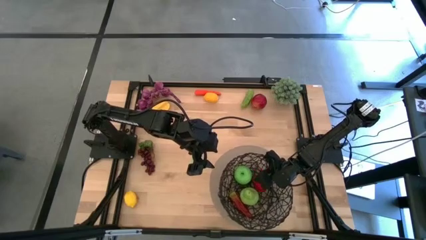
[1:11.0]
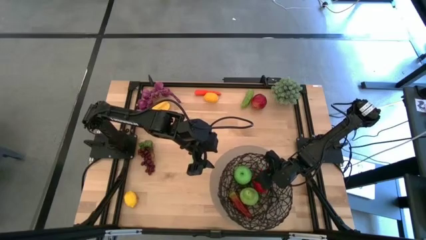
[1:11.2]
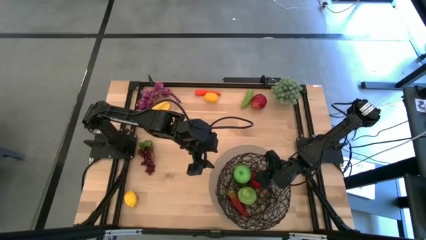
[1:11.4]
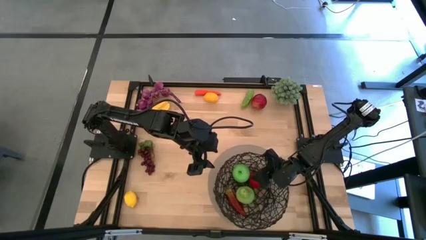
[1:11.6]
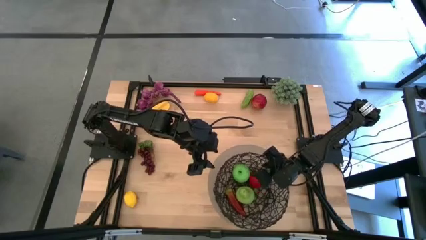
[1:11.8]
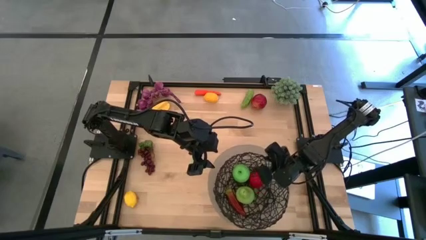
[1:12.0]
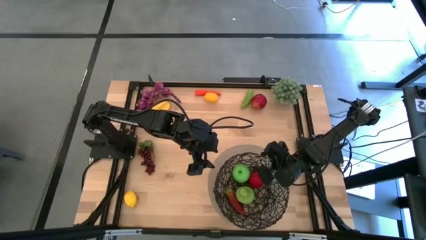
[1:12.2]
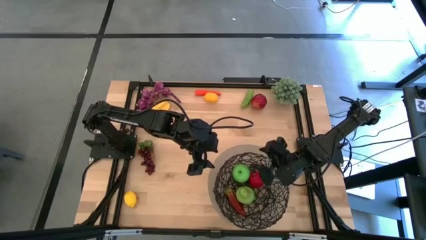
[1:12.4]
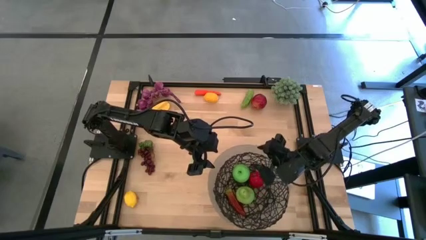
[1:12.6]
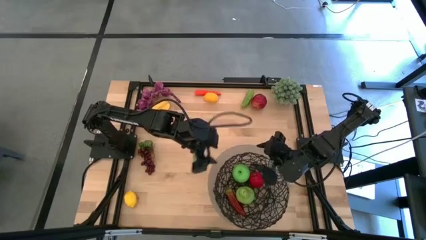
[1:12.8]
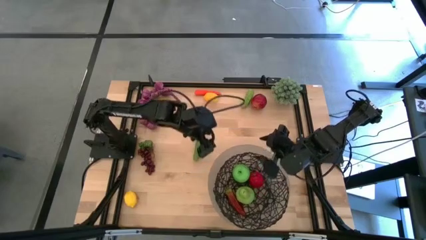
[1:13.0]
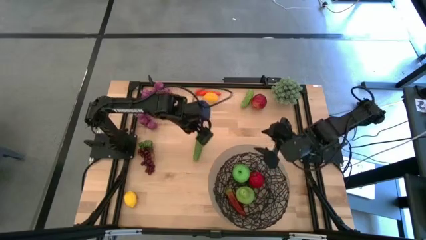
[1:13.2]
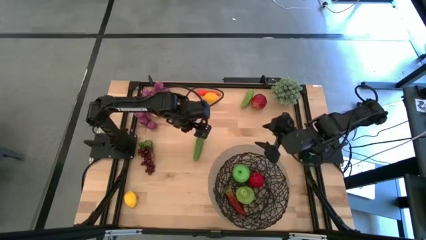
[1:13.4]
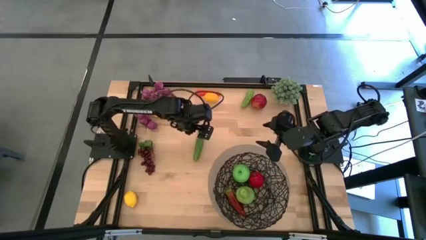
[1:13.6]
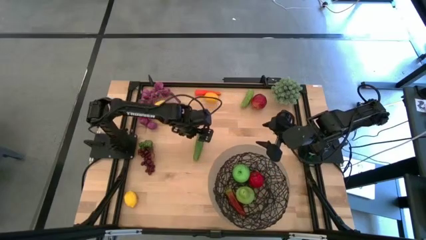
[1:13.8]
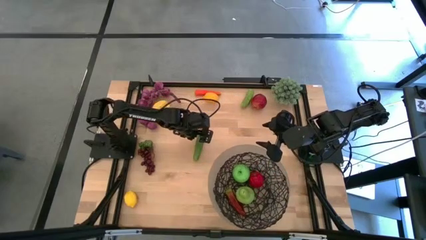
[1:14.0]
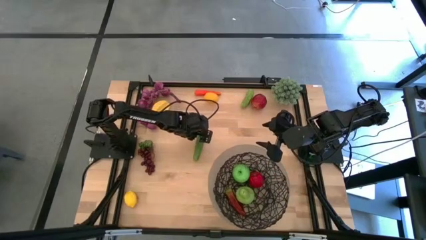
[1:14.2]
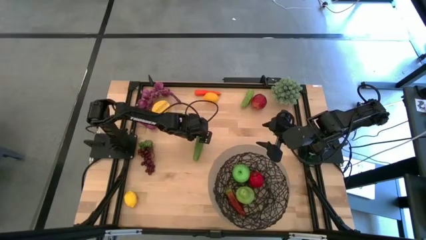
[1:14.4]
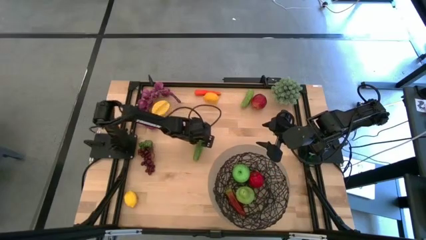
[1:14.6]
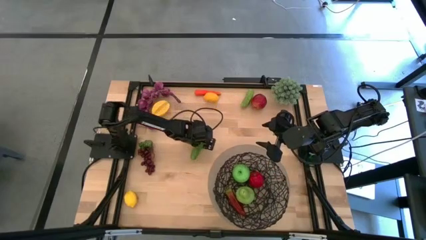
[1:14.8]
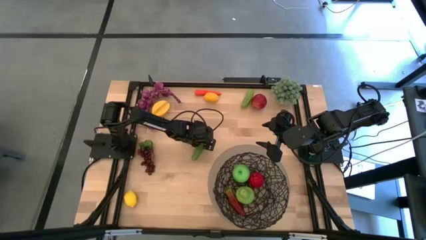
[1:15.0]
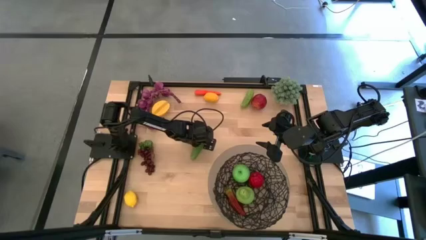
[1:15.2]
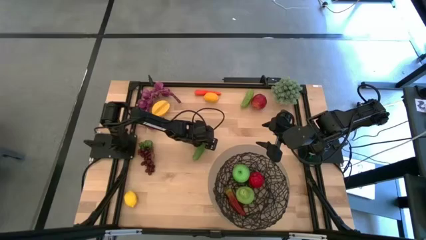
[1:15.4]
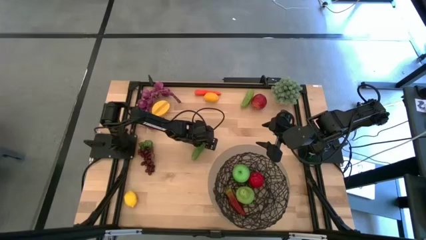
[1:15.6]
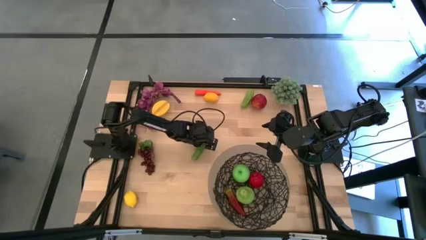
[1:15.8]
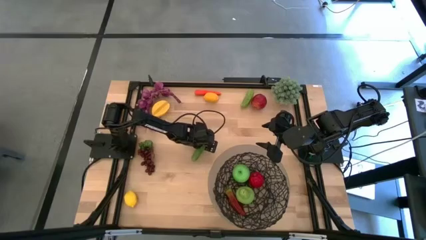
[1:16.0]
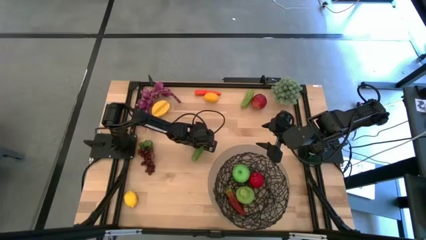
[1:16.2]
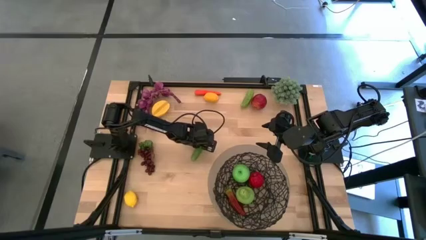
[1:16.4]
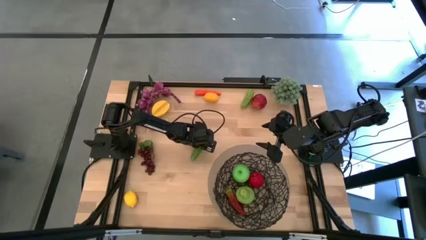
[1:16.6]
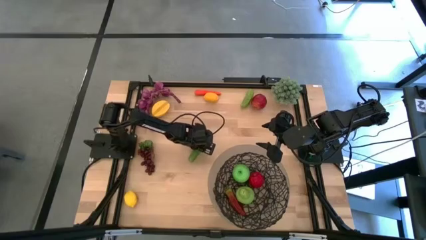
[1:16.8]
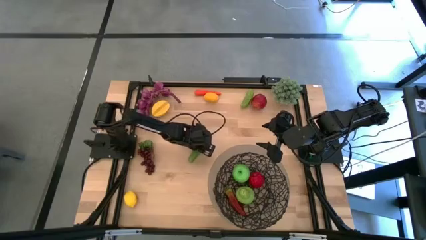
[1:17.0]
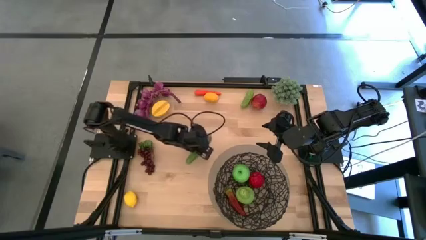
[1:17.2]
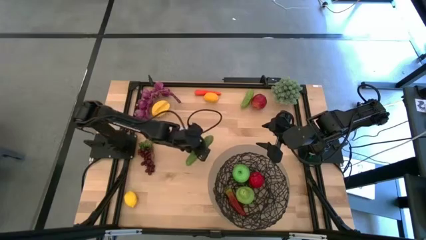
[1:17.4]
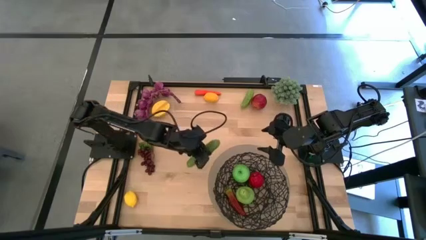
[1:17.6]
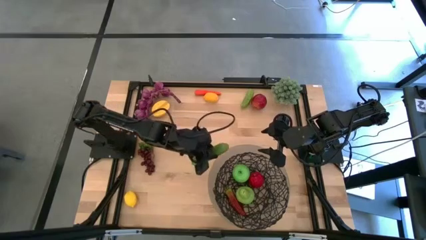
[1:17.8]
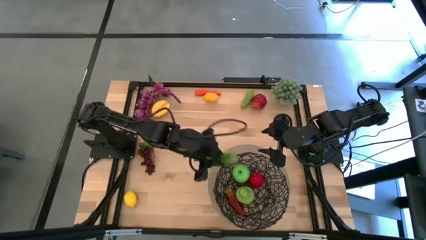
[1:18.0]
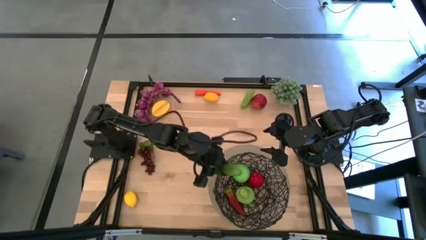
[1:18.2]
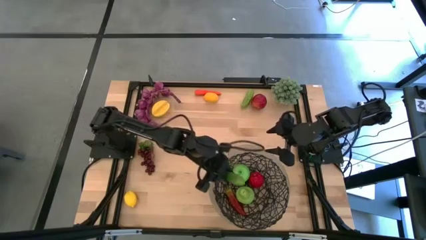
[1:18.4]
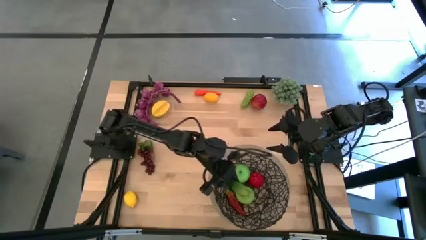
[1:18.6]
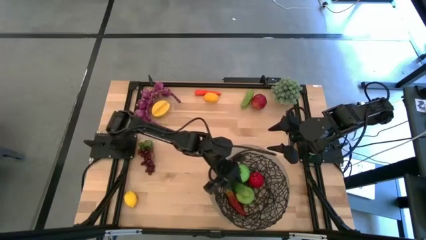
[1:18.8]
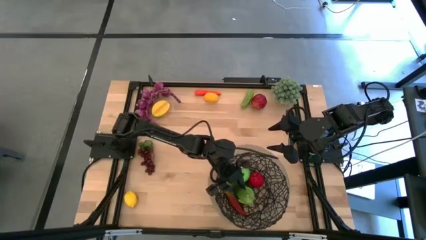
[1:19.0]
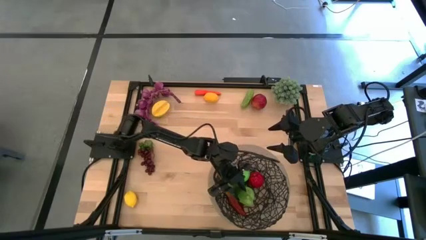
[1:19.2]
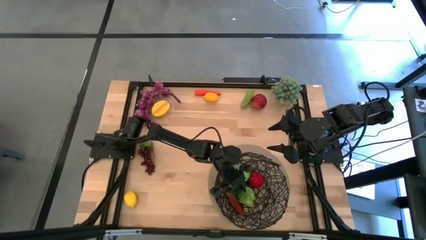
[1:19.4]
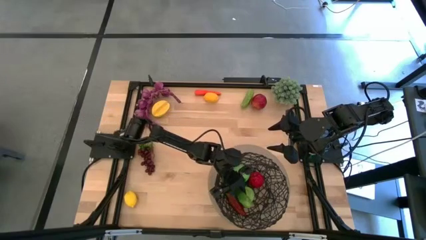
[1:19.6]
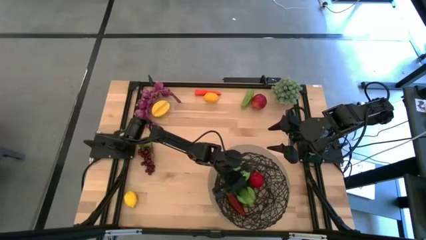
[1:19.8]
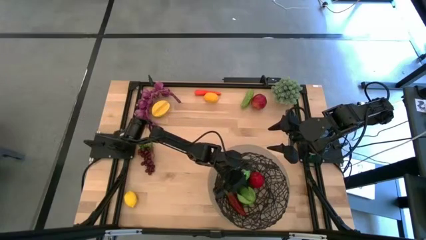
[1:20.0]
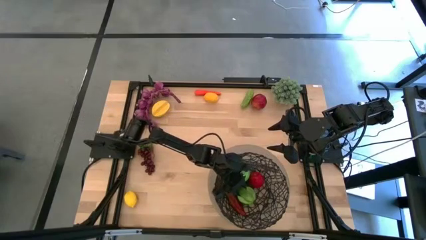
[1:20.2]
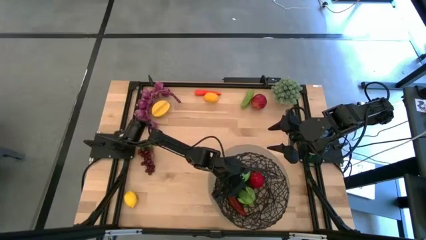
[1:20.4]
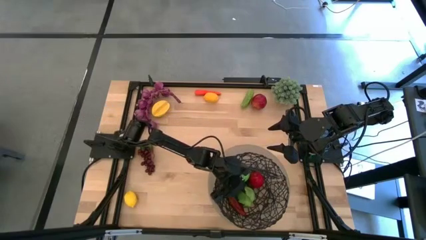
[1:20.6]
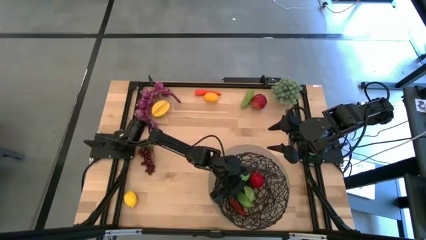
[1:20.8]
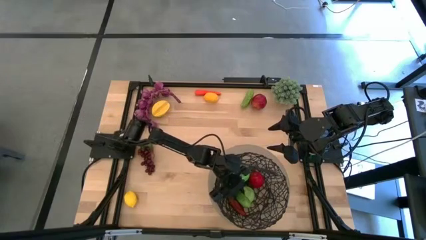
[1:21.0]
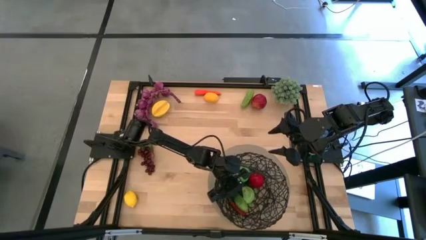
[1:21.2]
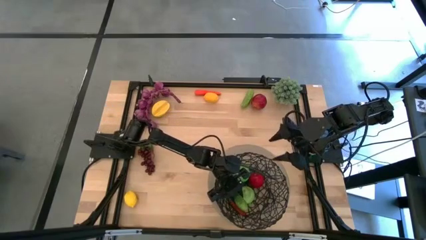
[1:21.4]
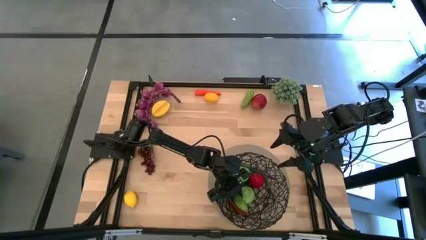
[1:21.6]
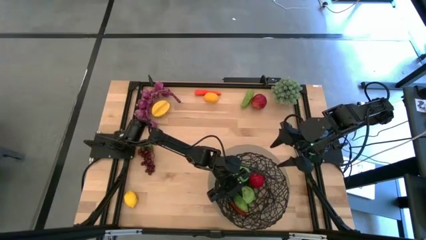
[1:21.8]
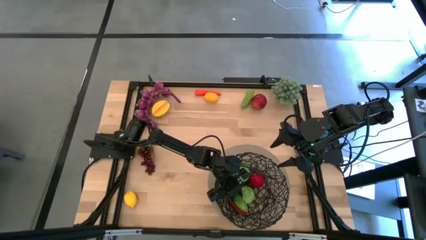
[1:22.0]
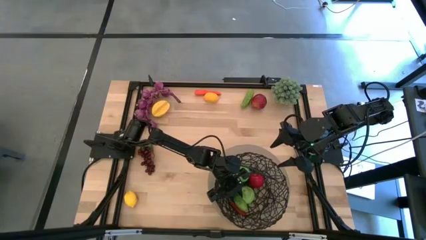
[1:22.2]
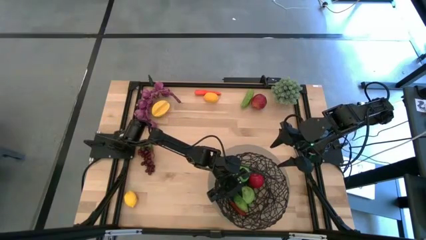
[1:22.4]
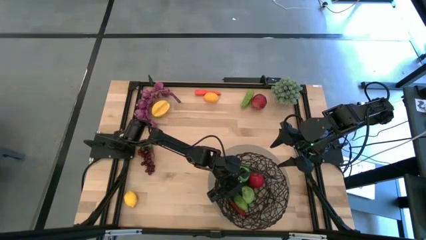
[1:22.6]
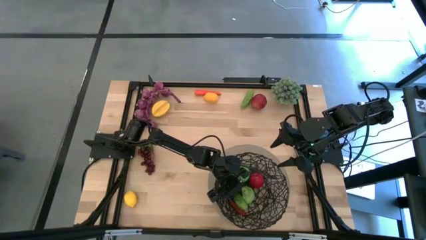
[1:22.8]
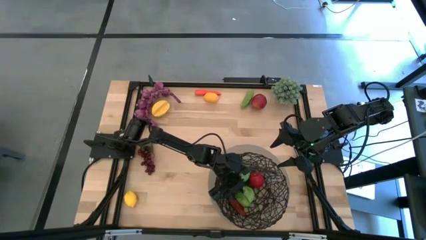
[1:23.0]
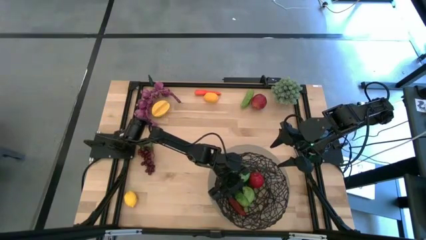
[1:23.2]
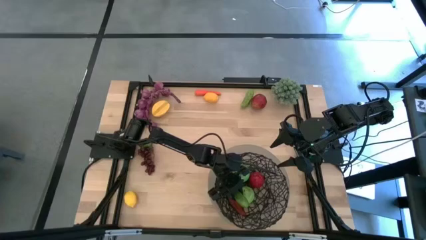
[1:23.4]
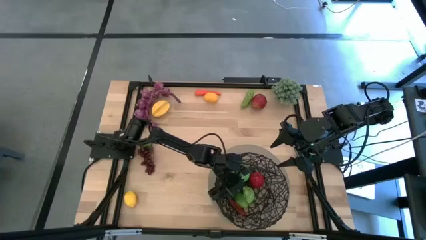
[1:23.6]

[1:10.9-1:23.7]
Task: Build produce basket
Put the bottom cucumber into the wire basket

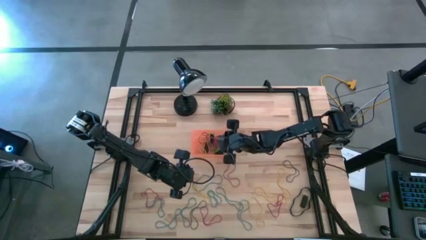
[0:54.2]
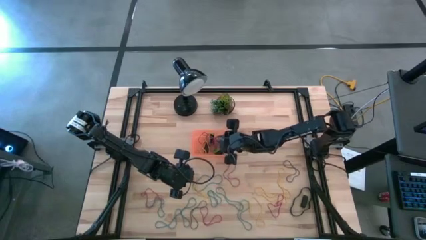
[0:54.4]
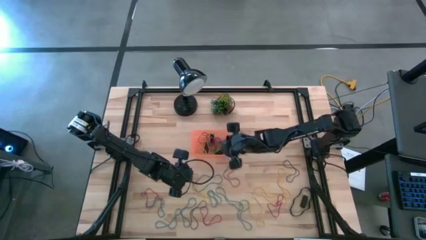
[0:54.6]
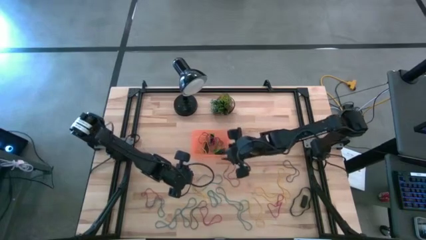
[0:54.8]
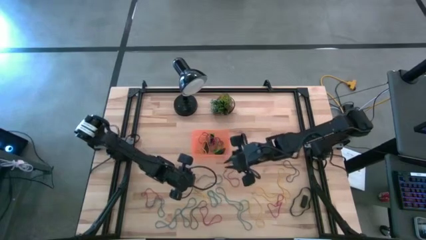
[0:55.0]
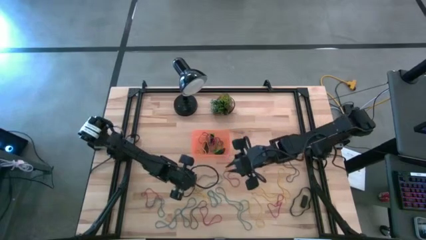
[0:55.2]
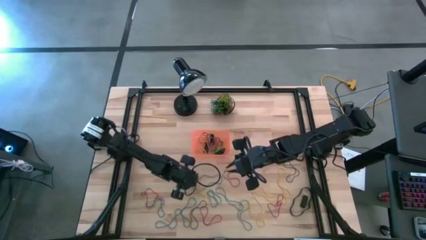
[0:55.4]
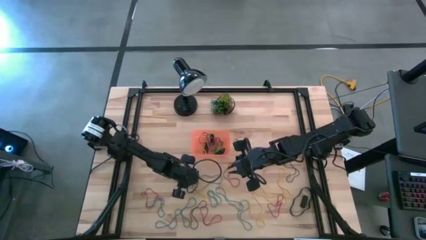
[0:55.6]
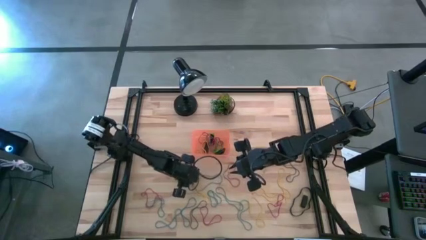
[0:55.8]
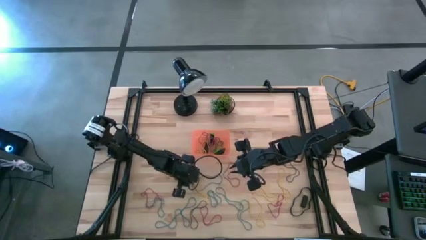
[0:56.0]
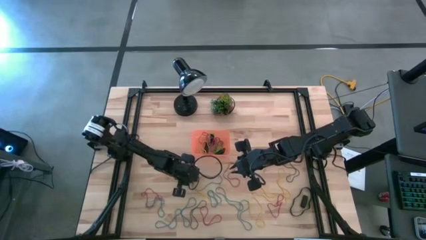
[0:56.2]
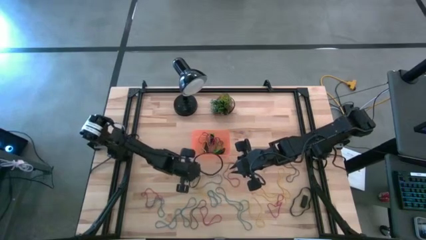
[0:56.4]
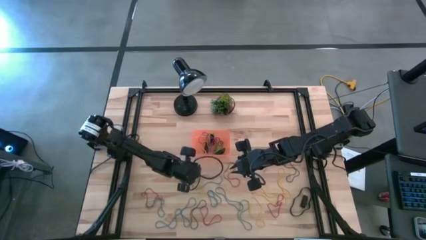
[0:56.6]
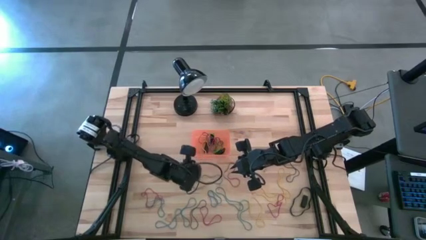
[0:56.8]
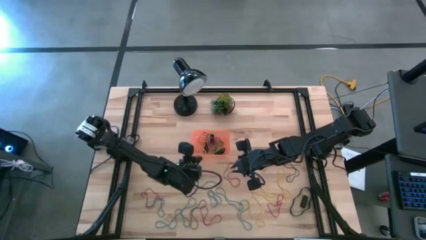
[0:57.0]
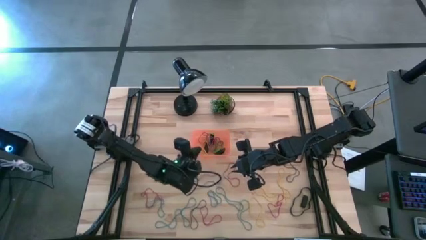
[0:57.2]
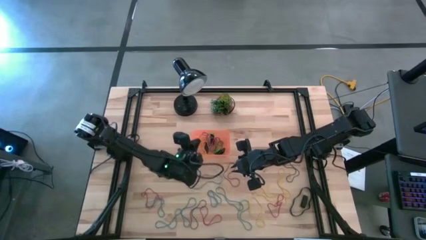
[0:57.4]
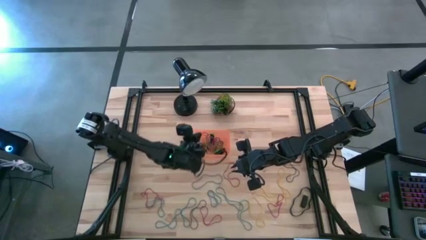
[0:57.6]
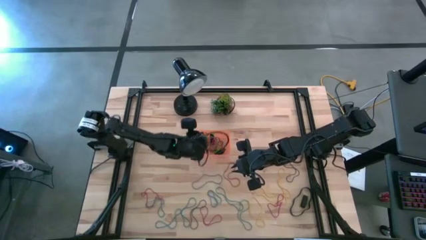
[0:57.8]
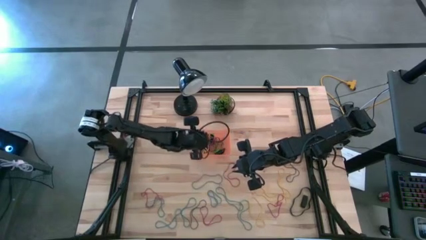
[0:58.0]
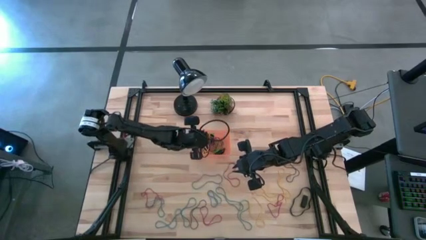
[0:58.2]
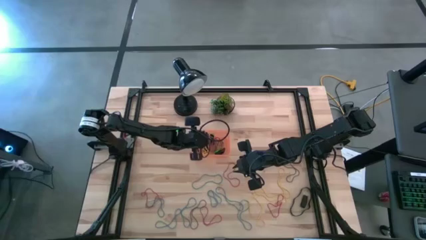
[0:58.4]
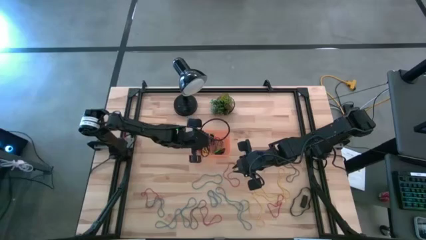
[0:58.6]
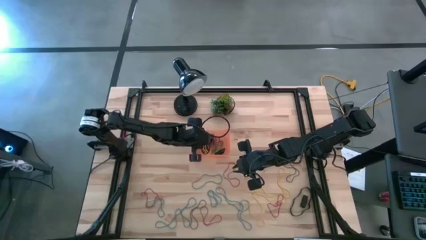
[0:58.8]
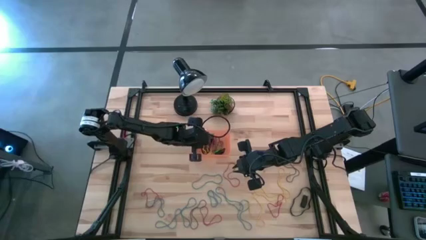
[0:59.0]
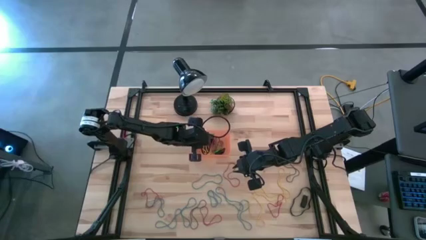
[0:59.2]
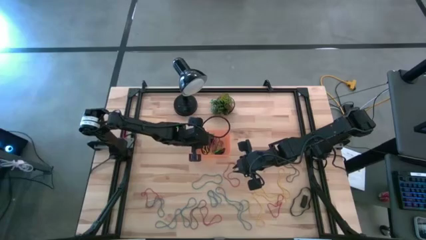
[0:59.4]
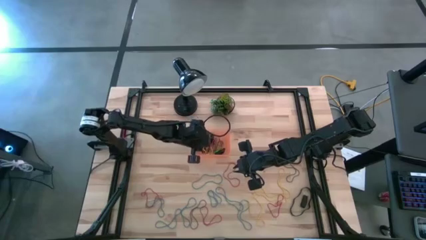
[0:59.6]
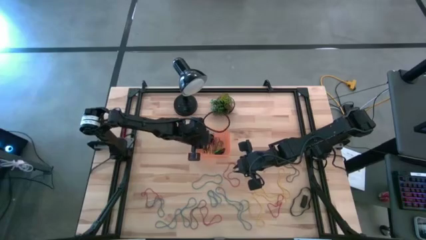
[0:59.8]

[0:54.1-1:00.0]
Task: Pick and place rubber bands into bin
Put the yellow rubberband into the orange bin
